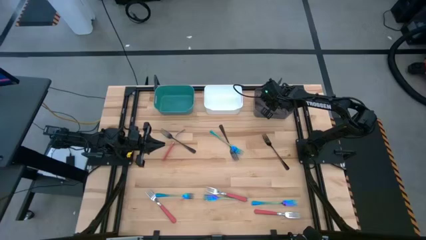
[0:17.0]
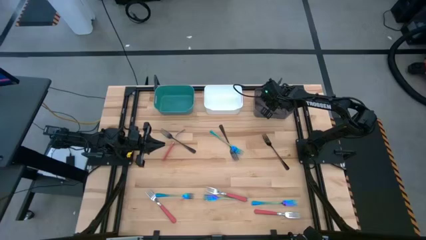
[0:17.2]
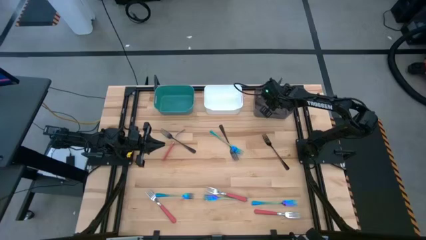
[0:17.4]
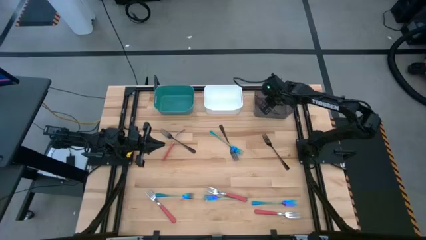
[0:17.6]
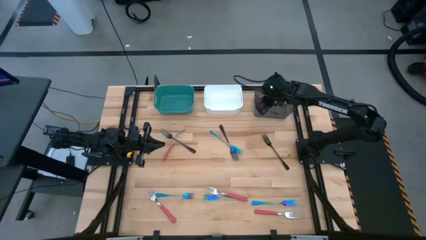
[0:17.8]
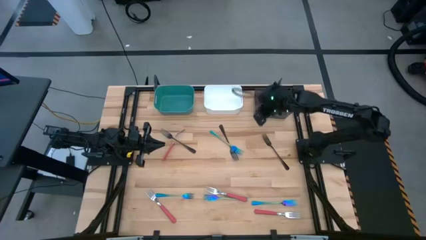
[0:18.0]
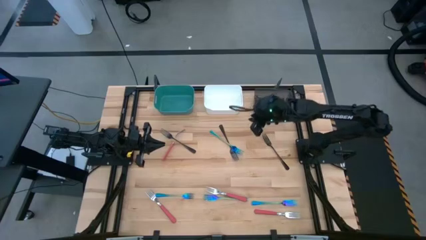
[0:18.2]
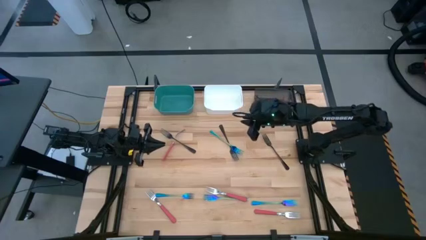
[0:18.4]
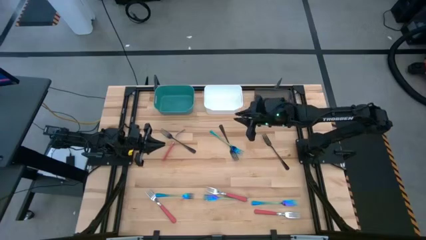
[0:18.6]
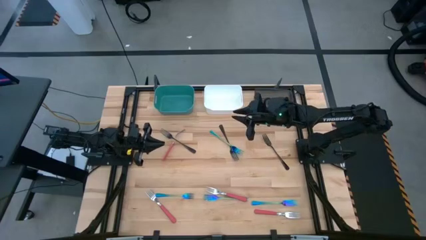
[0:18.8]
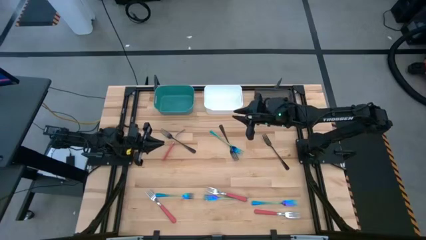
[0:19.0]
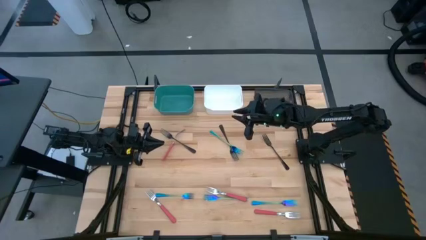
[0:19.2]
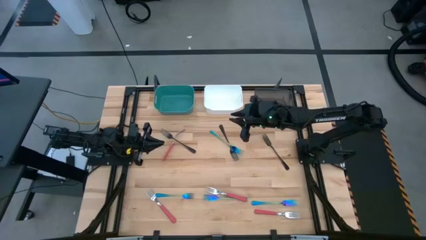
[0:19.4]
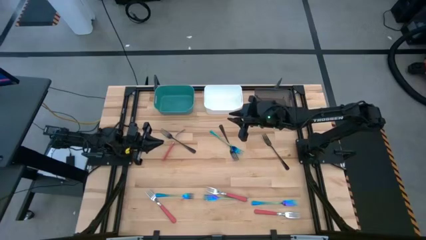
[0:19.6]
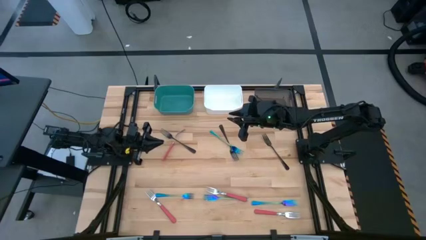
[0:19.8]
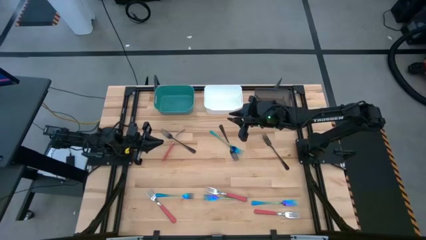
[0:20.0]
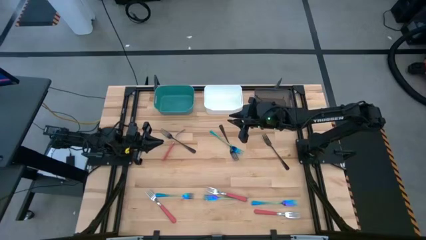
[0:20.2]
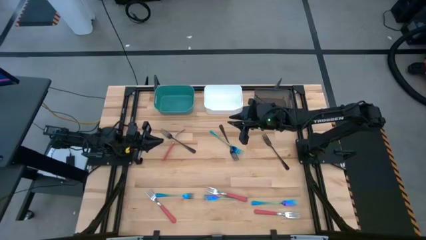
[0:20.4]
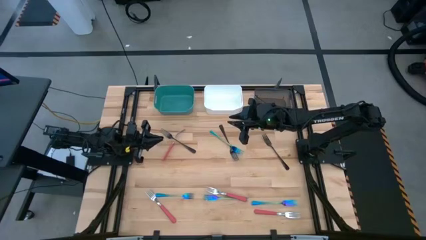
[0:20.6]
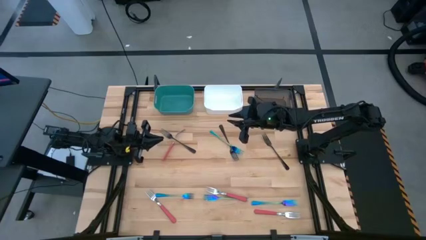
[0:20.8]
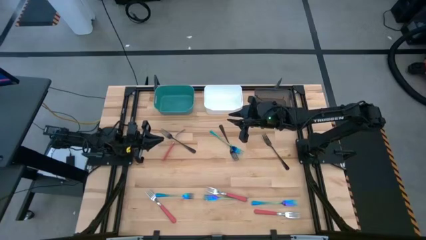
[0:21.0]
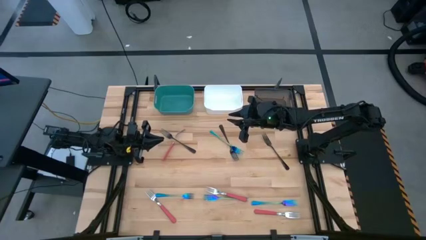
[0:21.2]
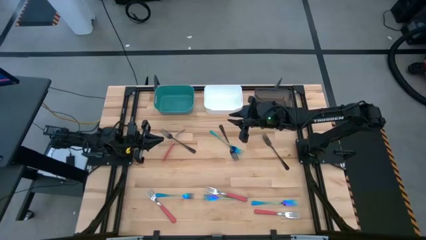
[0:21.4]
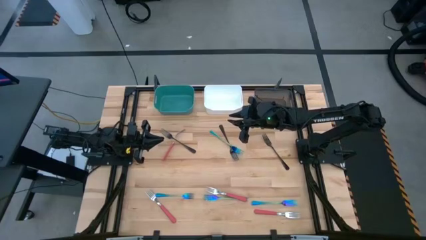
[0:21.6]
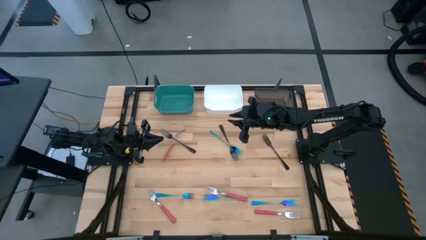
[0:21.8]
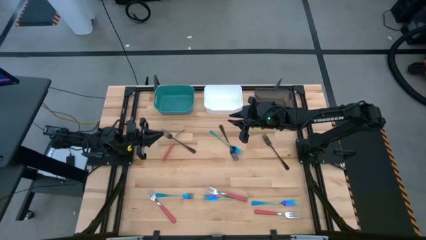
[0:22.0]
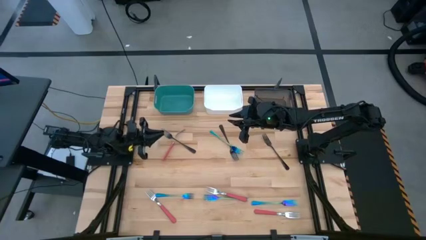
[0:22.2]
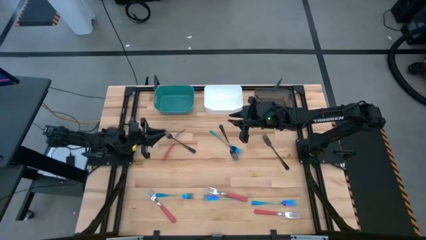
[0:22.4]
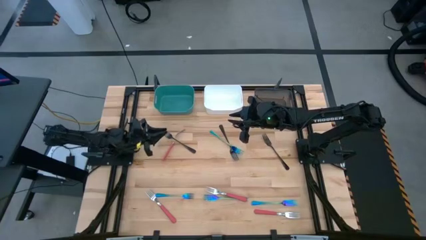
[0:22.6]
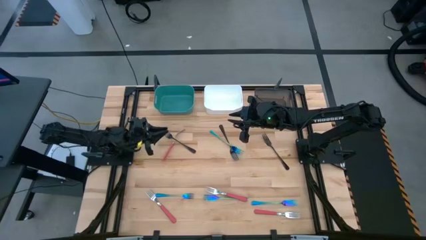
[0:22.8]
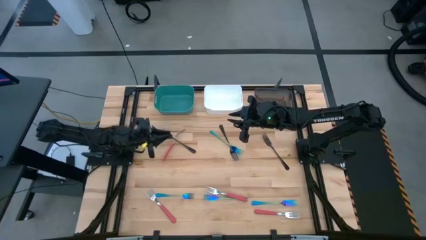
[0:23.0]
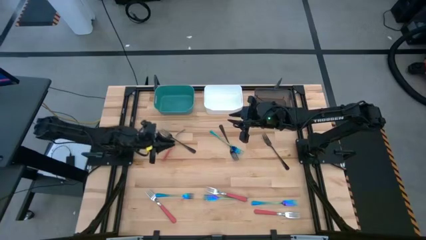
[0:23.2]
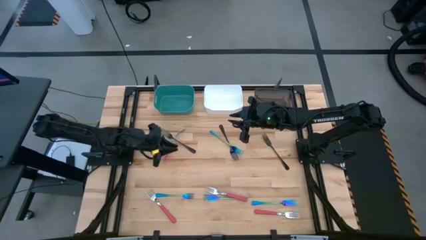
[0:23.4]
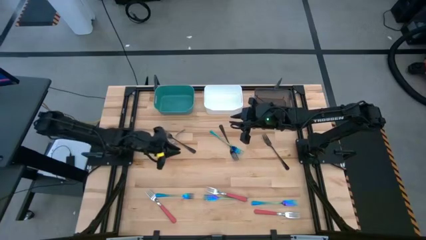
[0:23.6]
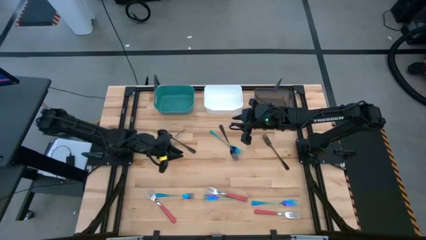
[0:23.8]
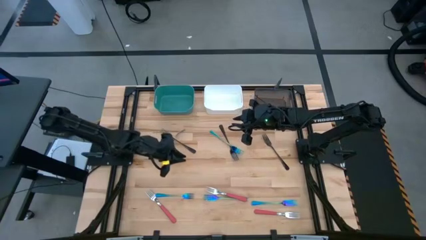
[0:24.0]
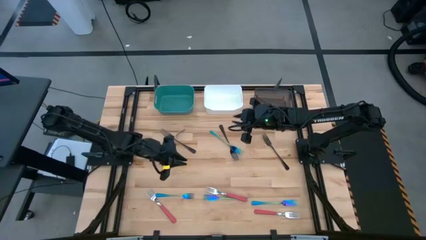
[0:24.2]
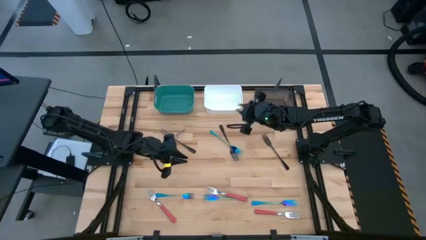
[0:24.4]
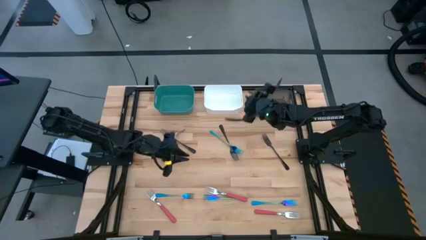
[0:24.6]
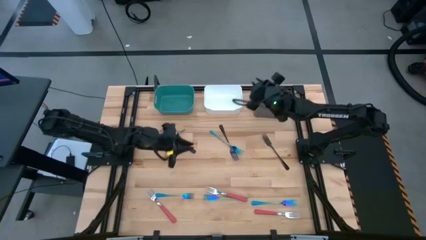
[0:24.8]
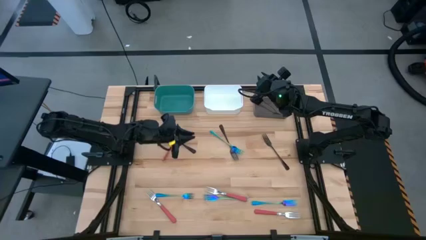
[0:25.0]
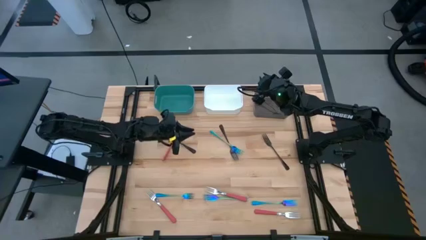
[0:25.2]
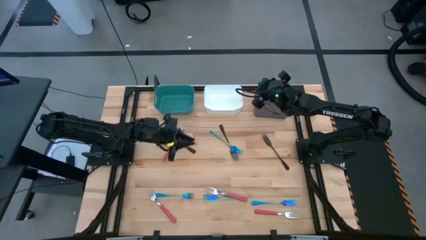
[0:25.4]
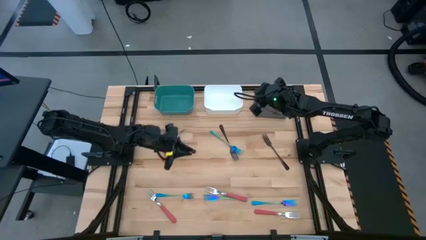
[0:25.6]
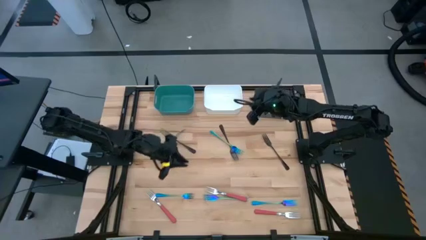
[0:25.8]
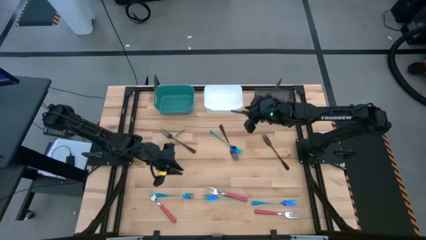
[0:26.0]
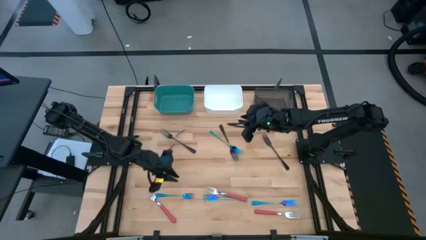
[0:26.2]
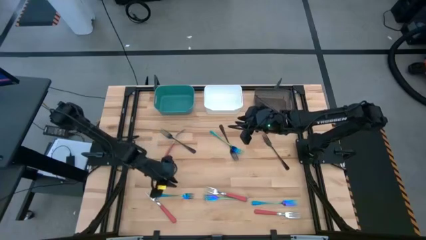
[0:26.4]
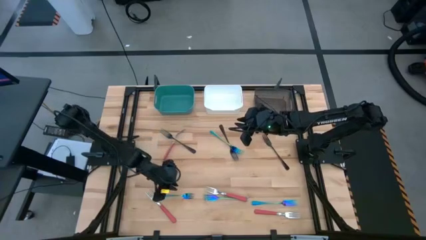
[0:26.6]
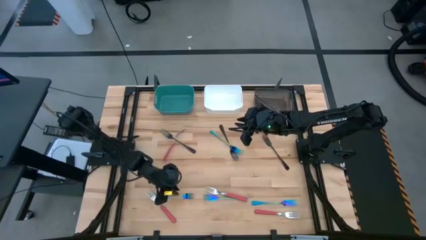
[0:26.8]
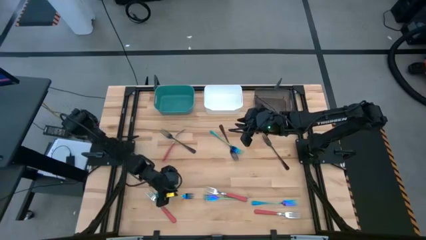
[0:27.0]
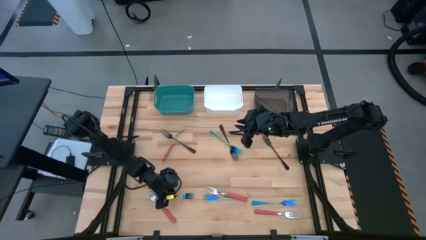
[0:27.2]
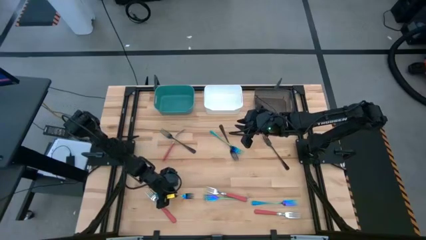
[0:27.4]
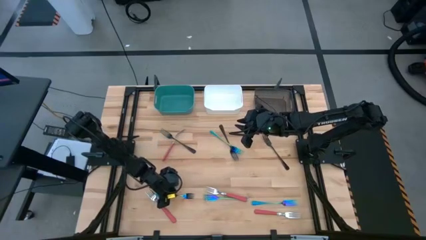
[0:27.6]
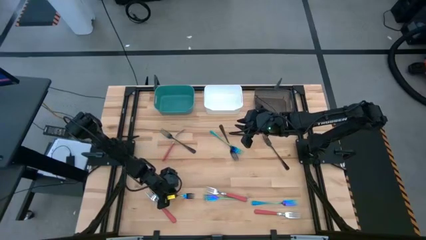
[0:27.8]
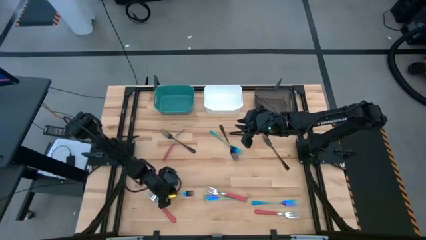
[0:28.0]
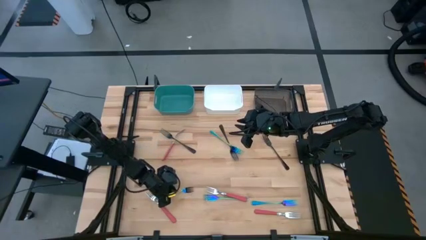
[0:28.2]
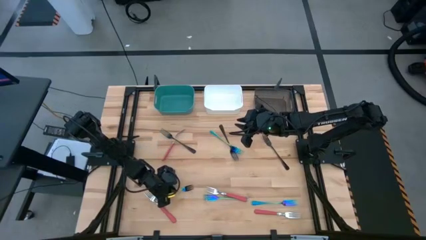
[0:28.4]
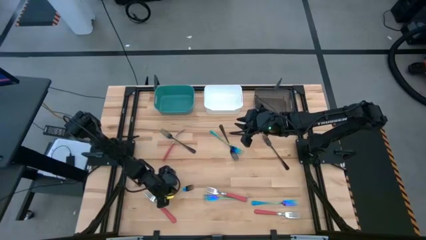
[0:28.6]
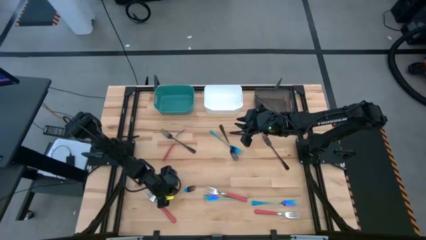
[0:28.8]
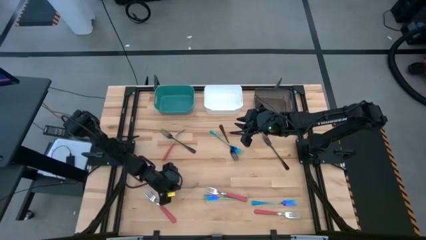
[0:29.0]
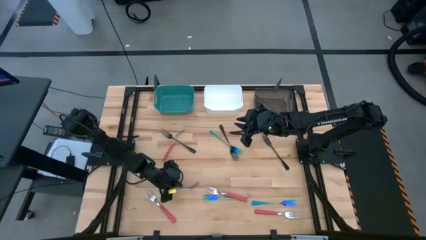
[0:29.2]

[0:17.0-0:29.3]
Task: Sort silverware by color (type)
Put the iridescent blue fork into the green bin

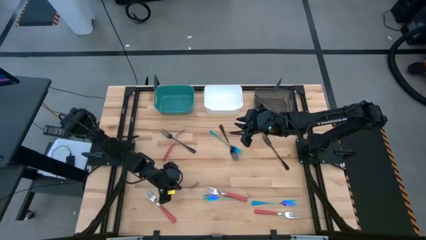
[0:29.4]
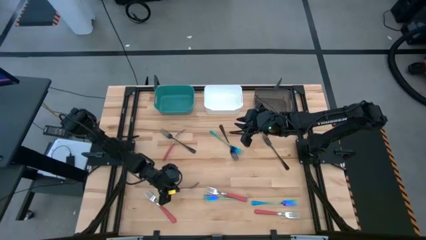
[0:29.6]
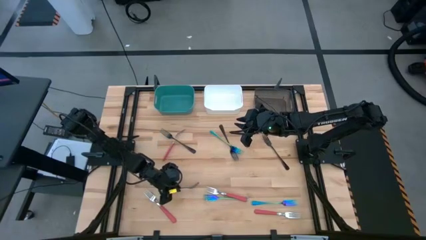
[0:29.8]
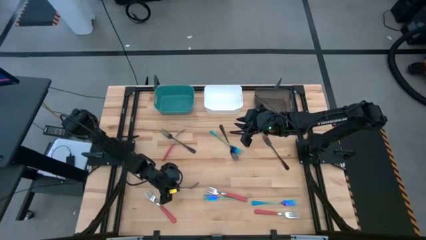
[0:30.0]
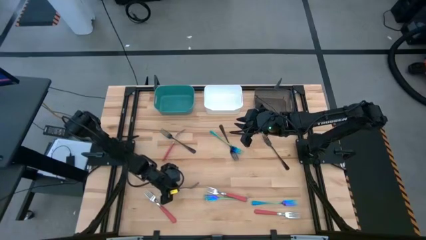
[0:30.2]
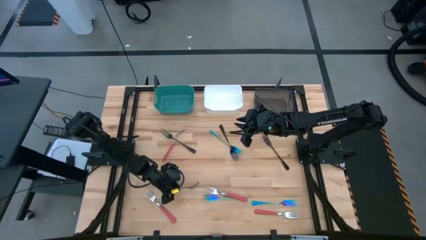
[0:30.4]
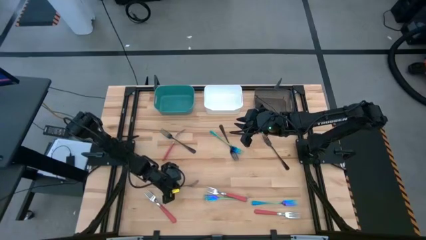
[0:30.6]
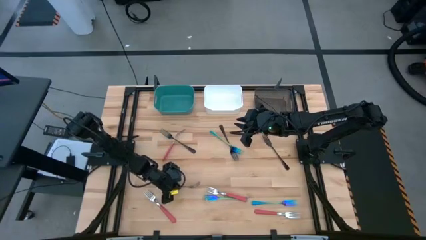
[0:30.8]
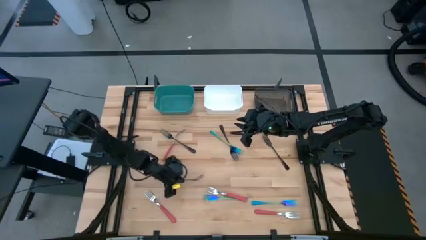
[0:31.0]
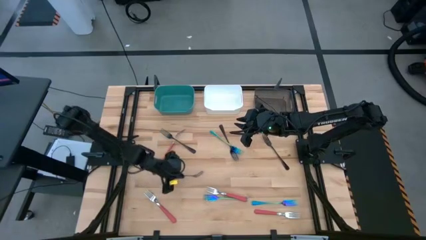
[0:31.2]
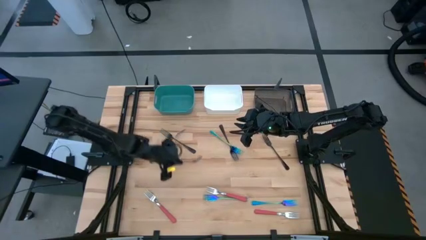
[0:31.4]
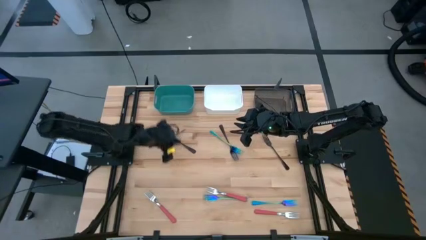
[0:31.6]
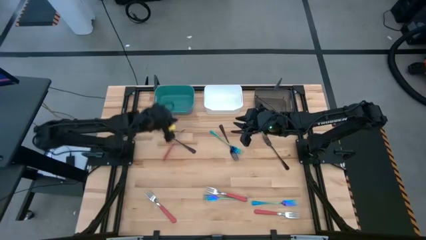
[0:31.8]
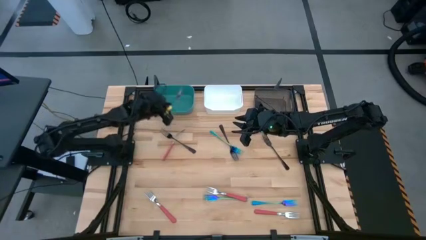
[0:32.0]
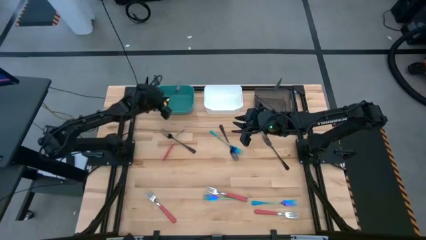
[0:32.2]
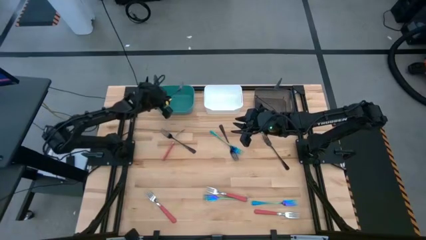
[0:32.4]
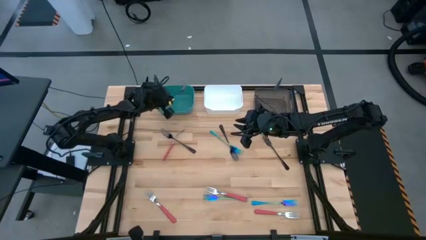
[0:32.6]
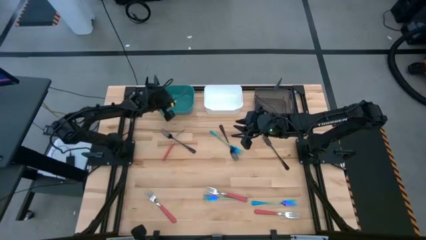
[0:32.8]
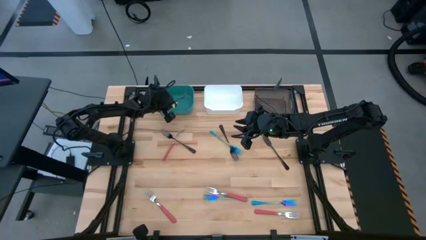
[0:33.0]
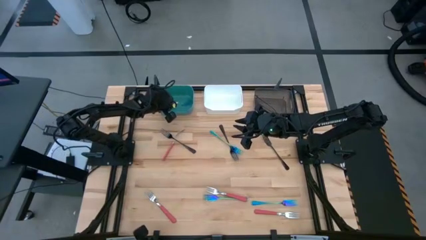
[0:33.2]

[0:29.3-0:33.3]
Put the iridescent blue fork into the green bin
